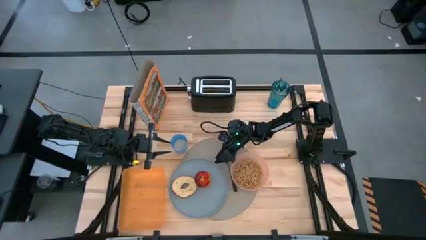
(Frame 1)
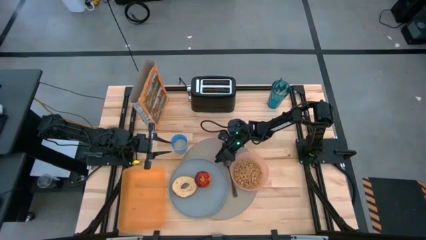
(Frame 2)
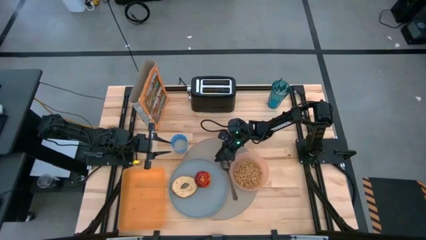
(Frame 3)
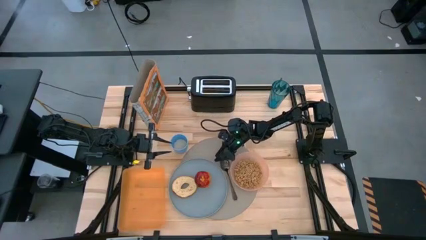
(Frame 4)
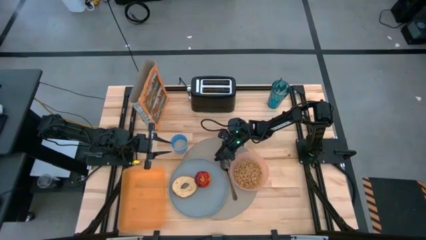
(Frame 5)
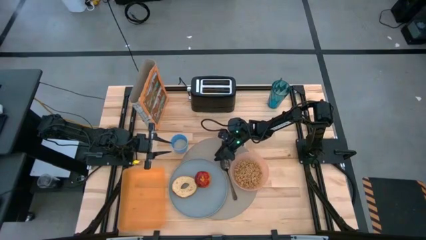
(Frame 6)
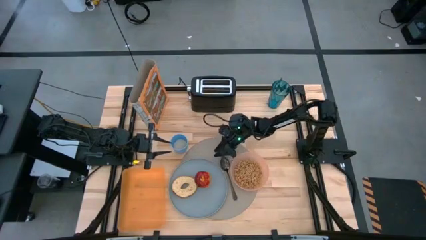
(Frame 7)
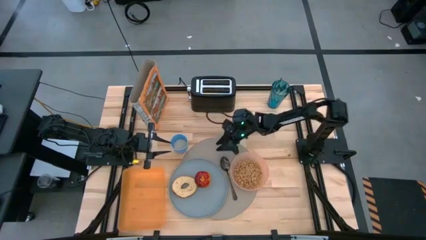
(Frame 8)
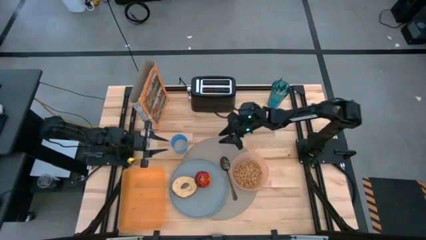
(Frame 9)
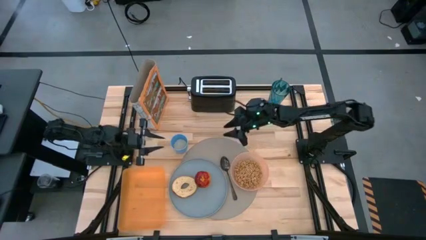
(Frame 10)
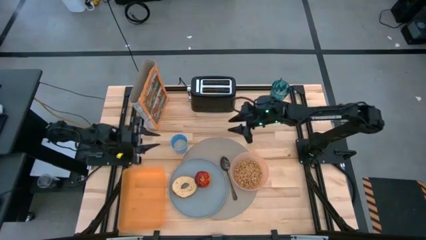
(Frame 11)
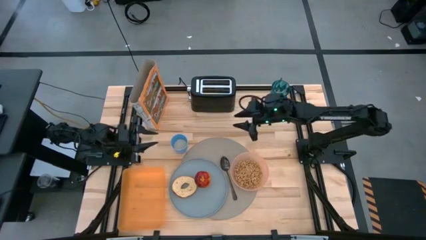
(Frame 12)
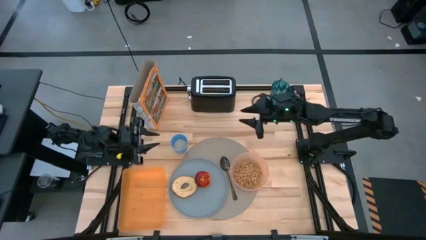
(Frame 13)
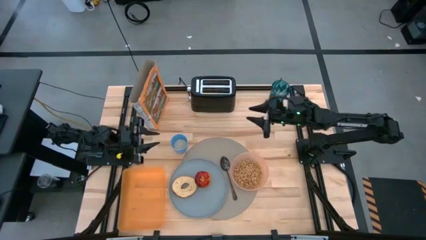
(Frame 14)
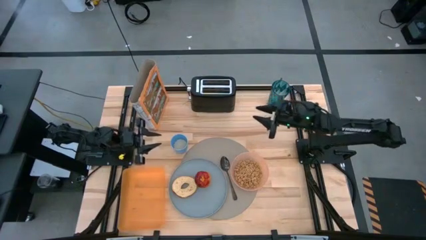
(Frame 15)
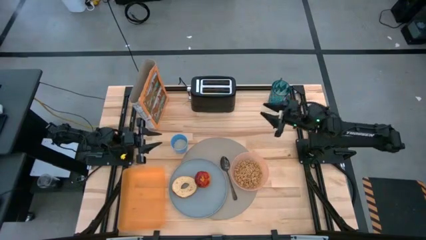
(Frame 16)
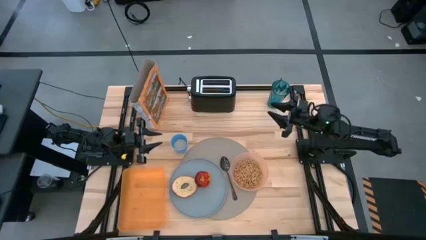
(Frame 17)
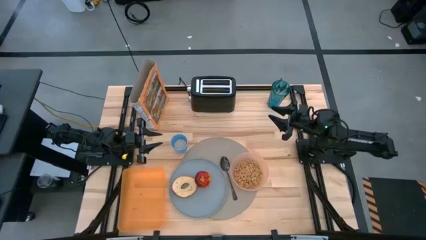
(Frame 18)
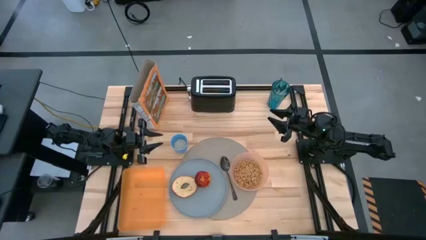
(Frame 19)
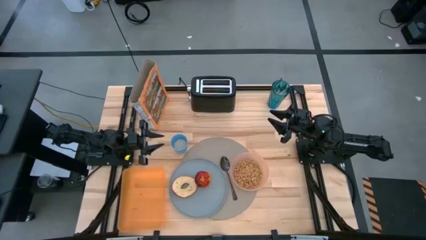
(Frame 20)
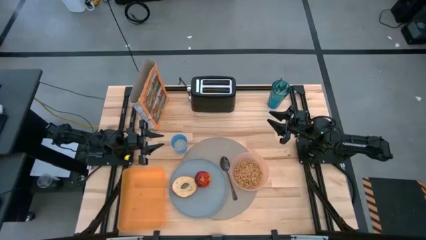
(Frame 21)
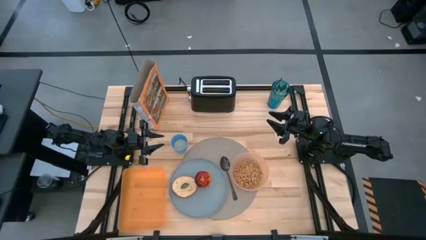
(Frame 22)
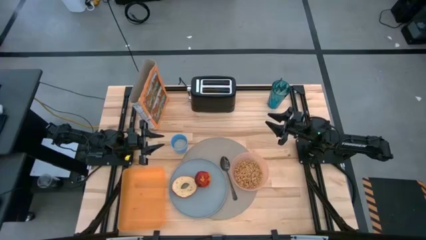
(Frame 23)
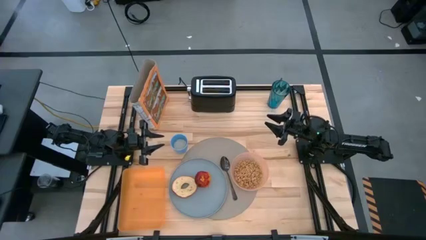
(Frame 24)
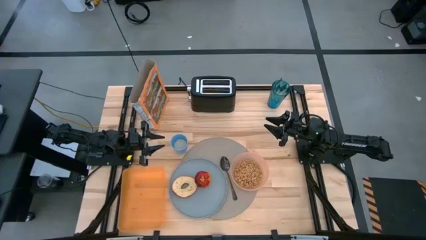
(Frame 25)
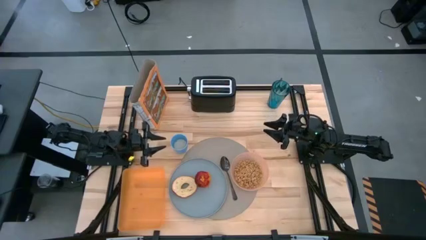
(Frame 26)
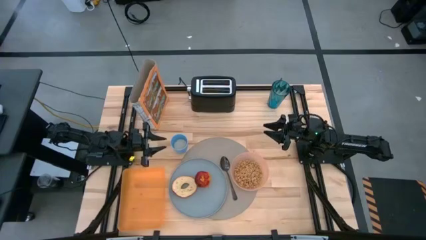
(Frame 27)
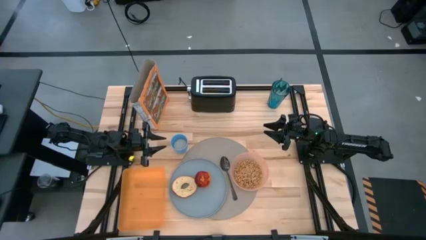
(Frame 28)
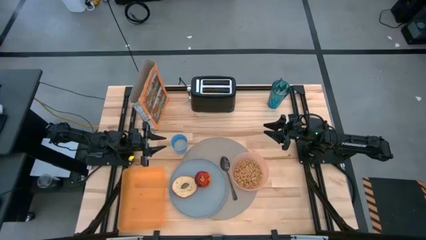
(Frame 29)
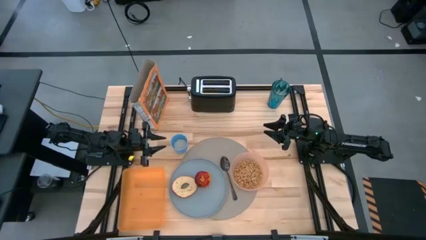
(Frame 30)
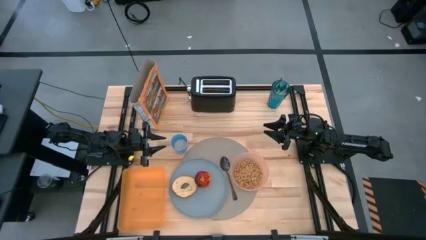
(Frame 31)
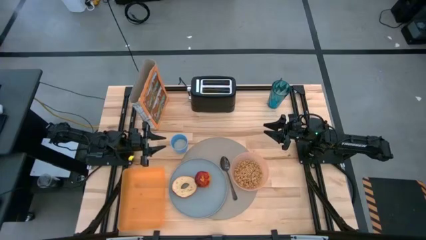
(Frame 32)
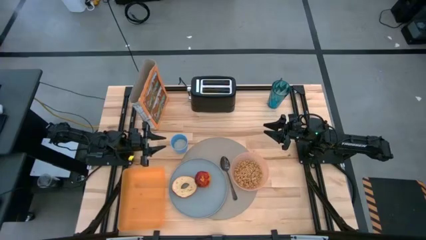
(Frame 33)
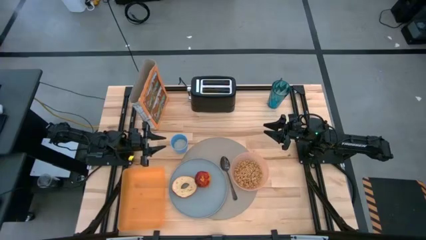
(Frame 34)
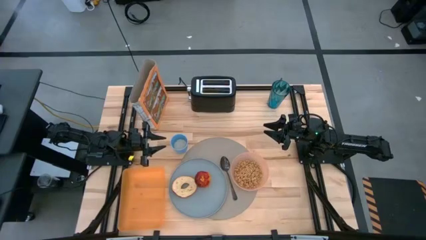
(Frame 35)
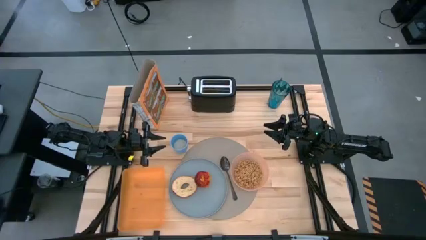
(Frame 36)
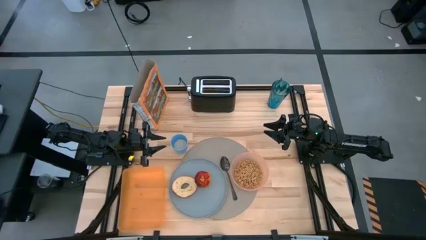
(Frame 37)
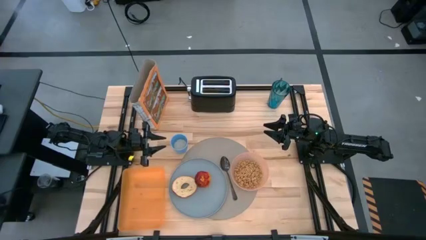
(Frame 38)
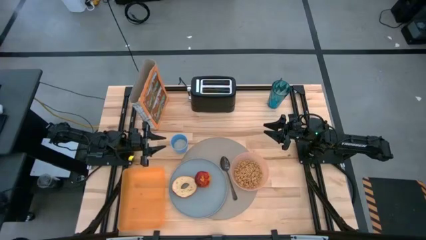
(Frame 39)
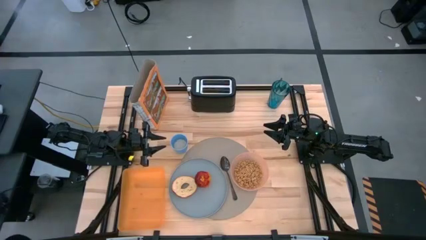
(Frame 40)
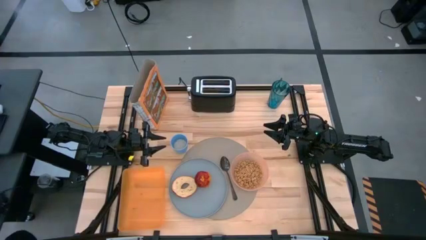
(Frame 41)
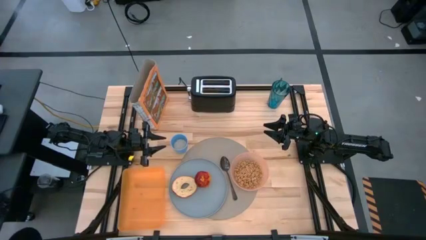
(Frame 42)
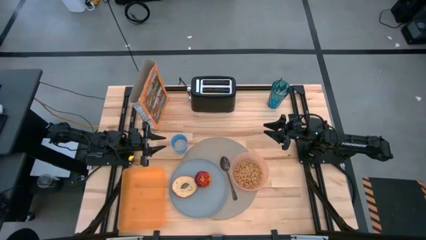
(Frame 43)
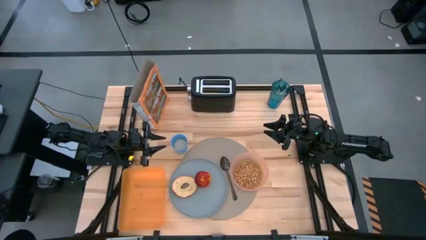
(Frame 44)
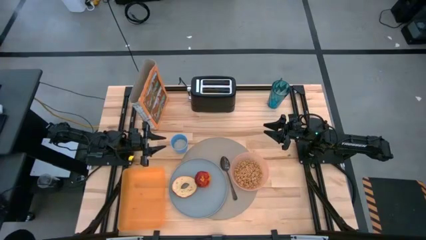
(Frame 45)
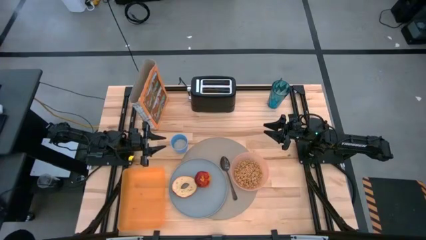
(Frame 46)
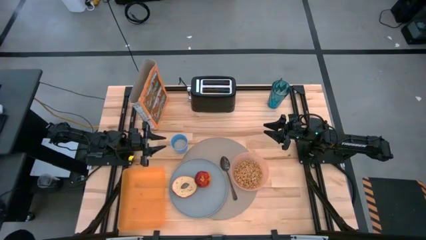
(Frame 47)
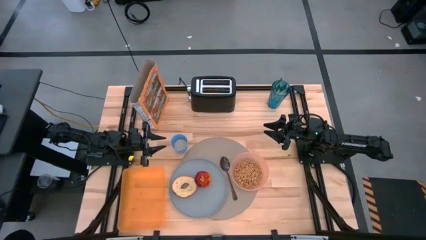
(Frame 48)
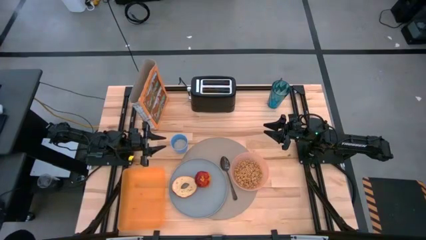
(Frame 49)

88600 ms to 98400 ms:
Task: Arrange a breakfast setting
Return to Home Position
